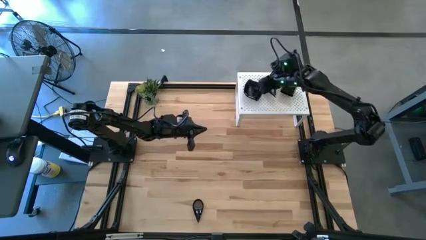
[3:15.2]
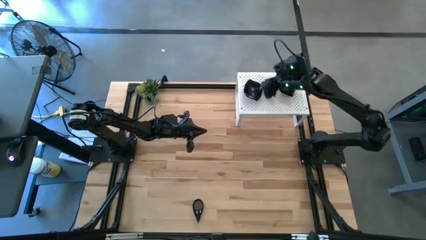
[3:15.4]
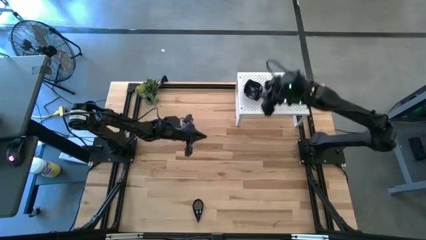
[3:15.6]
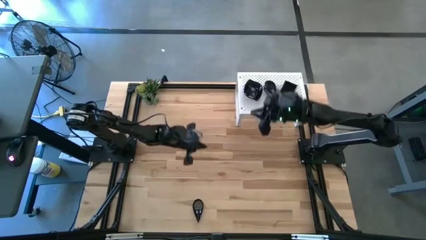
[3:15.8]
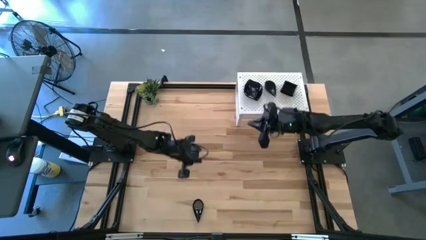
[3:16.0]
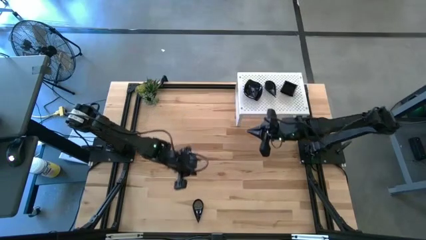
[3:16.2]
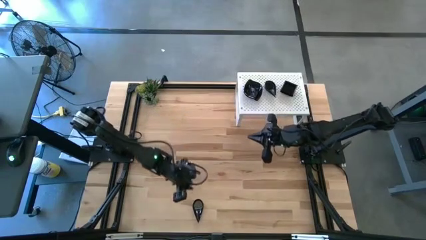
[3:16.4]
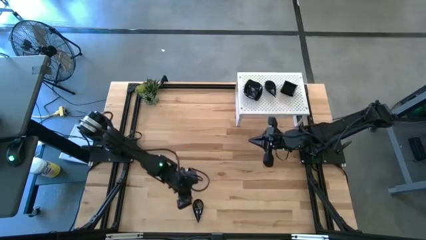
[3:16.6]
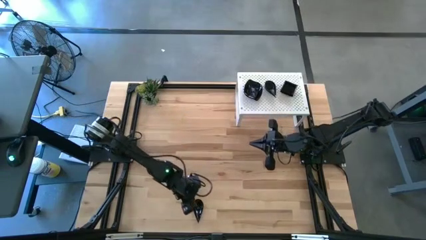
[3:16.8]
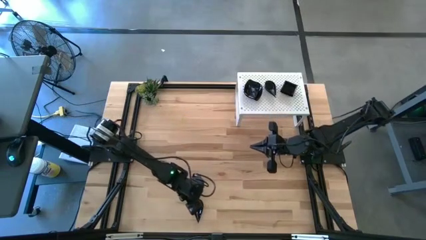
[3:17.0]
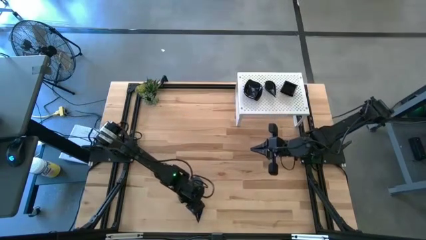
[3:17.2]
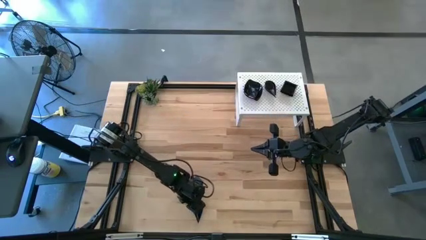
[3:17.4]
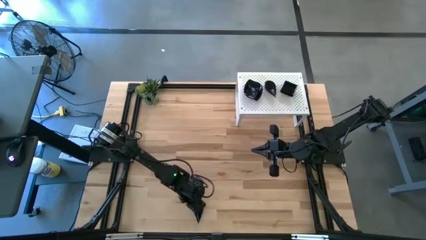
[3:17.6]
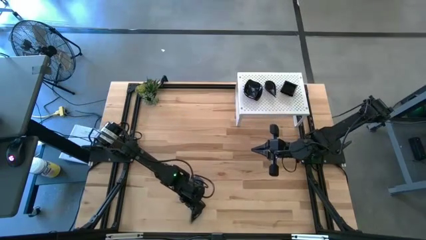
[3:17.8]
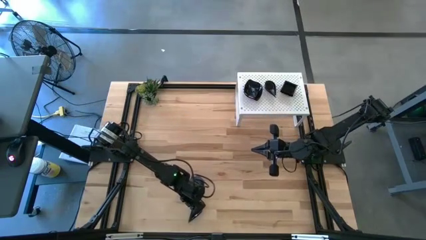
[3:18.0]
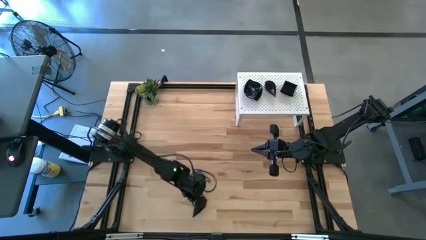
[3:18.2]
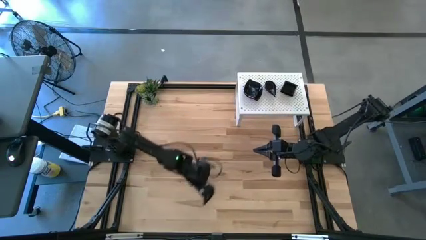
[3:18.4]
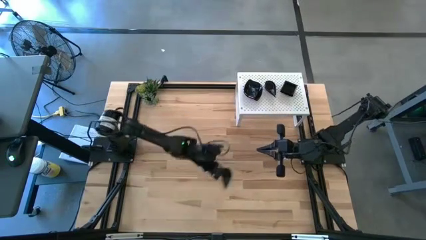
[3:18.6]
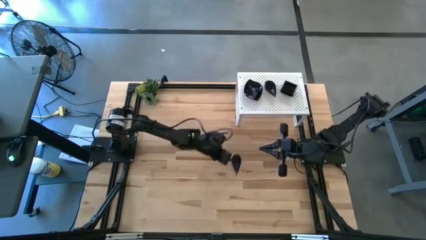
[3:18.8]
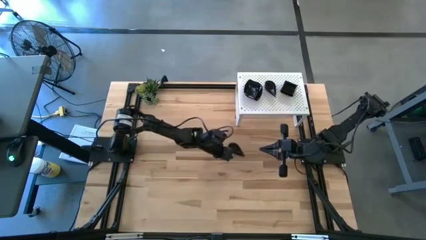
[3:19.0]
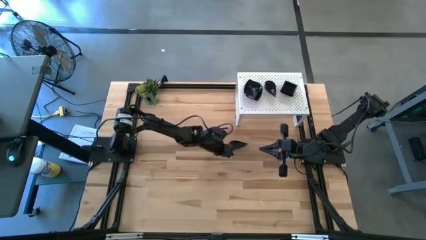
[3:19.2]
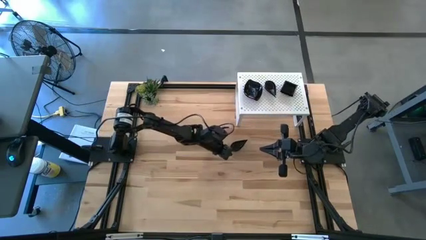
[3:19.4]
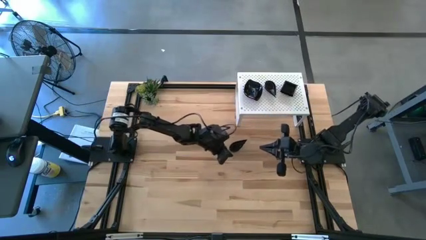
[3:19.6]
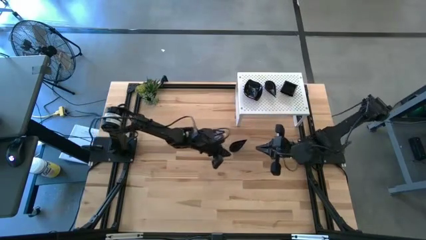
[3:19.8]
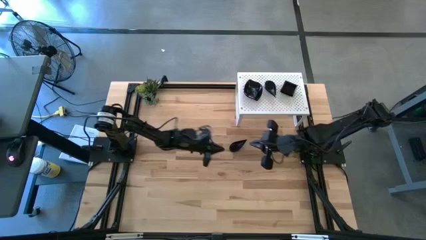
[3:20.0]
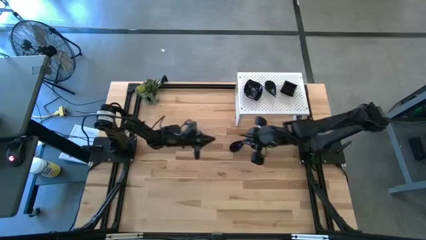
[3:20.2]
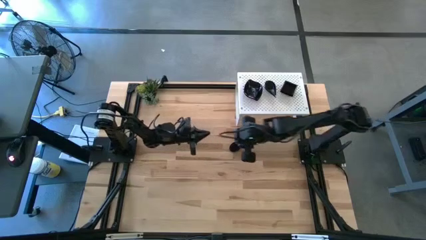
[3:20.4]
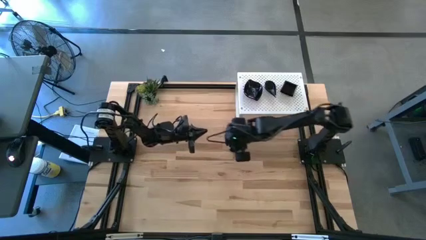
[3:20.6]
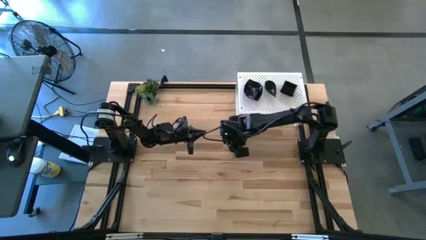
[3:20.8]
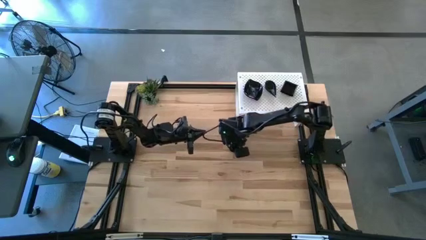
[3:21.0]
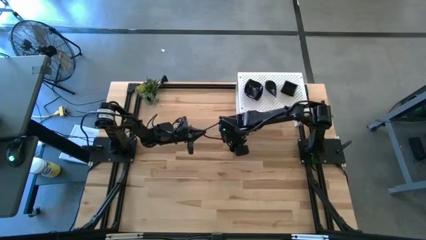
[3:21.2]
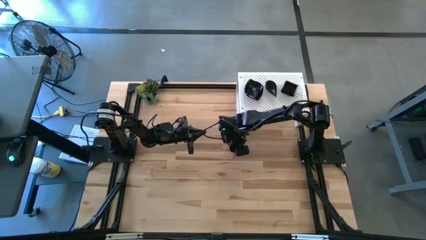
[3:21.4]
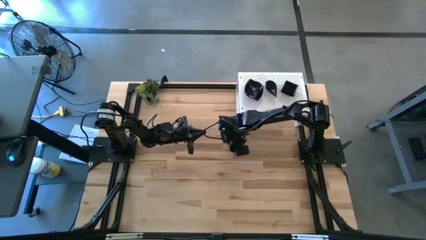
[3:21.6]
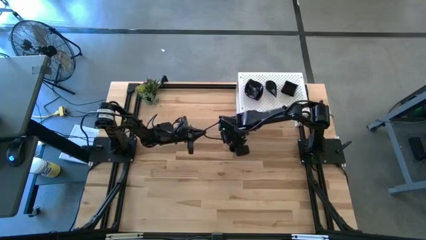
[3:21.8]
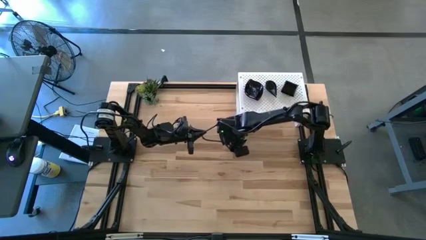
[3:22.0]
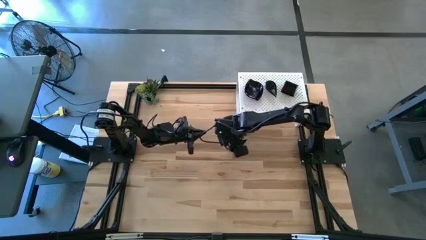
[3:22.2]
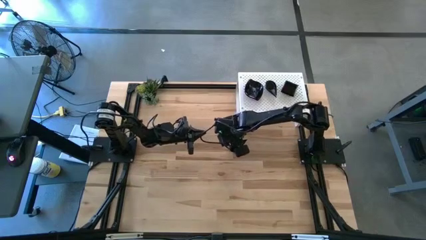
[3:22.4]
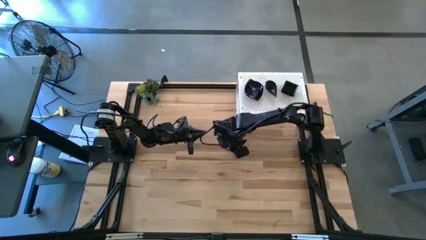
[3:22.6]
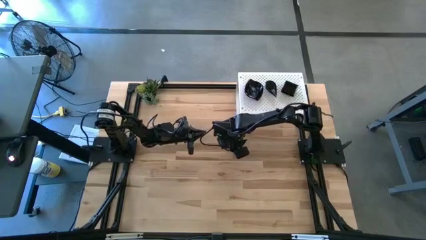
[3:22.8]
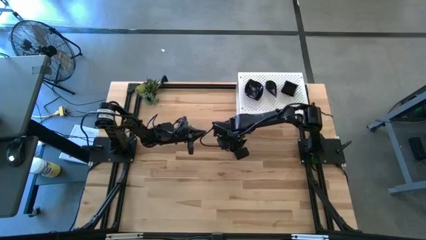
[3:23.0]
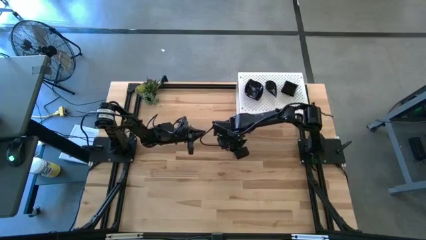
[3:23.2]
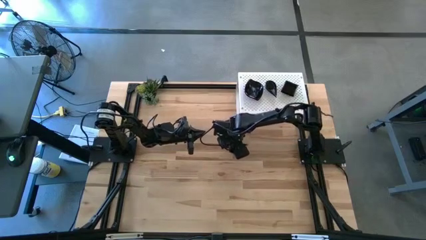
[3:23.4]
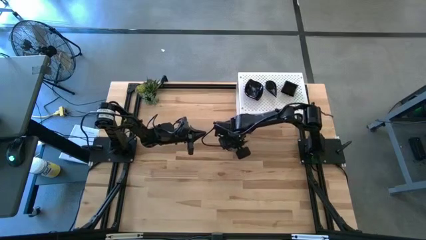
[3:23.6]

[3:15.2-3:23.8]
Task: Pick & Place Mini shaped plates
Stack the black drop-shaped plate on top of the black drop-shaped plates on the shelf

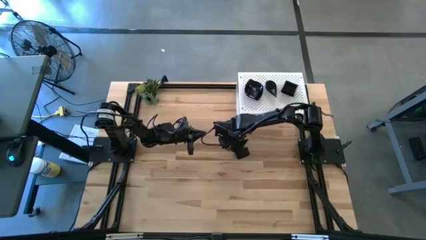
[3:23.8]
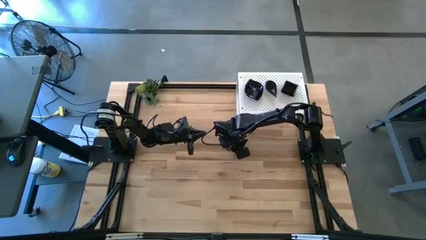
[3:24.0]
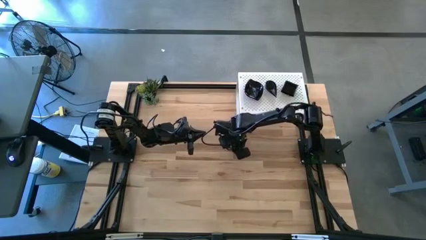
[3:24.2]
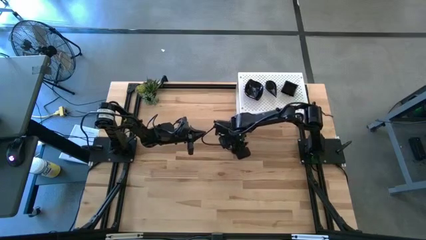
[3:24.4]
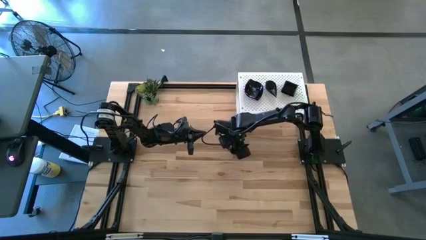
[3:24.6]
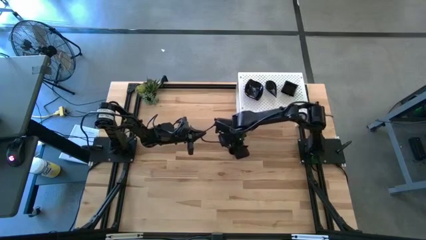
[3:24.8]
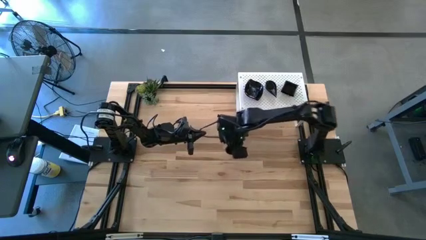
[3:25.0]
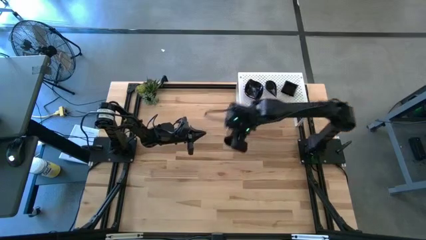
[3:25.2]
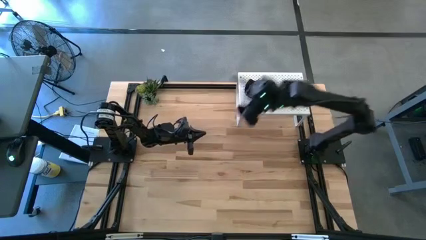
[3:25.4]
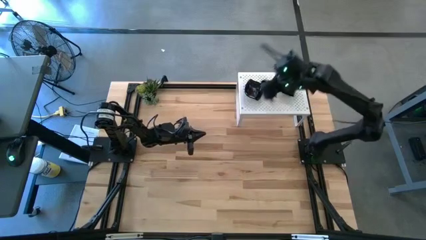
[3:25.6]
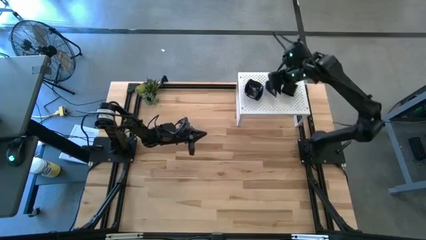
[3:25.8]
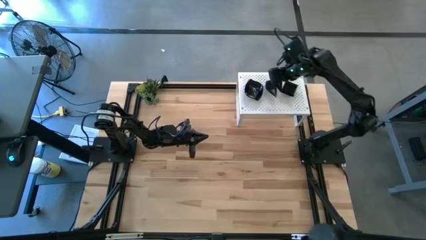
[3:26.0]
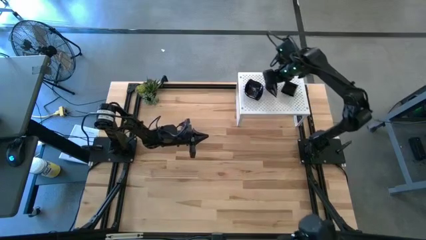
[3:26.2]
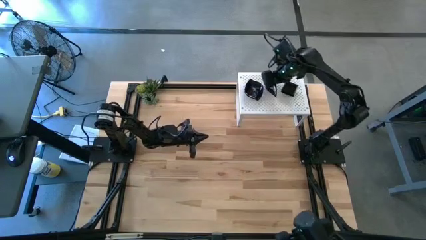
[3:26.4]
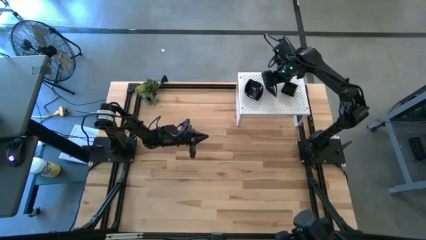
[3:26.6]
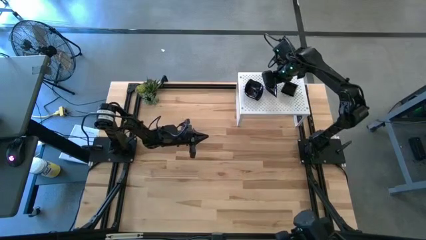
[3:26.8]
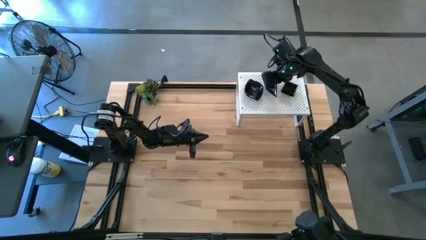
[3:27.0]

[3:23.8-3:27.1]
Stack the black drop-shaped plate on top of the black drop-shaped plates on the shelf

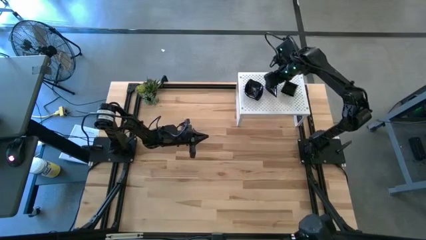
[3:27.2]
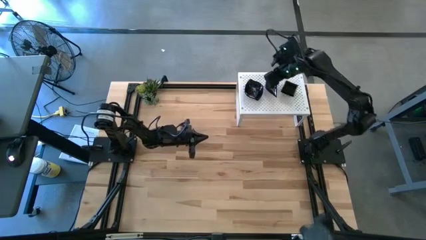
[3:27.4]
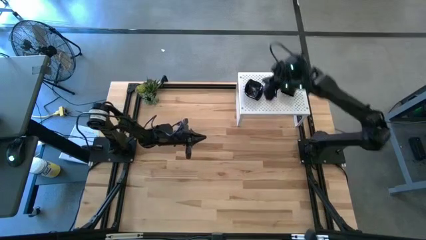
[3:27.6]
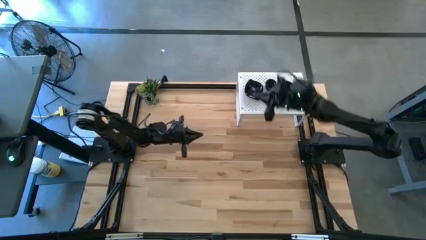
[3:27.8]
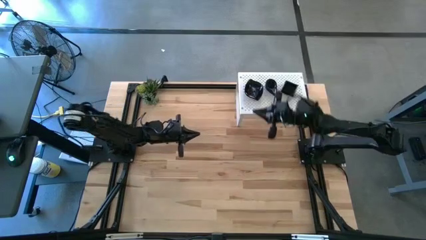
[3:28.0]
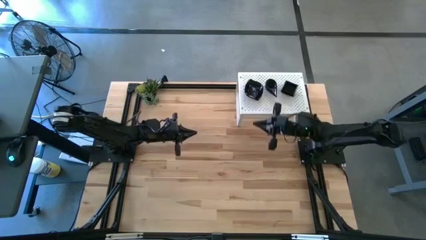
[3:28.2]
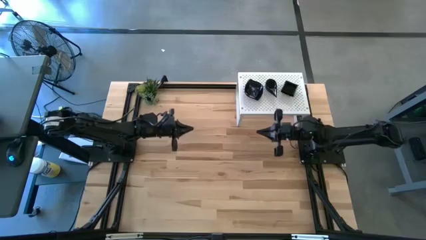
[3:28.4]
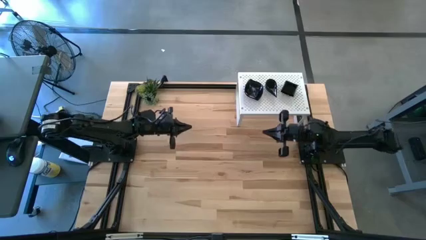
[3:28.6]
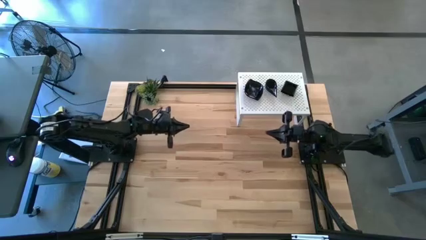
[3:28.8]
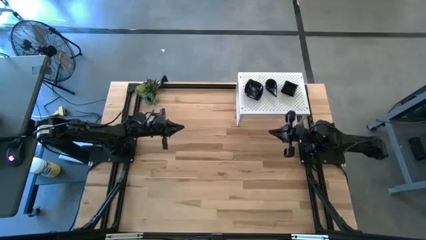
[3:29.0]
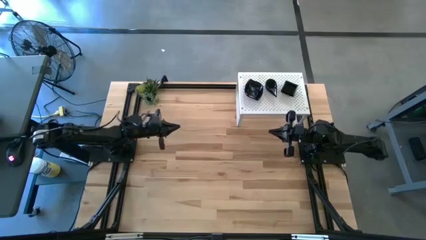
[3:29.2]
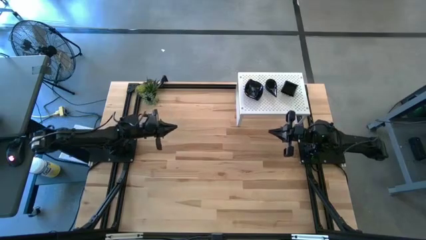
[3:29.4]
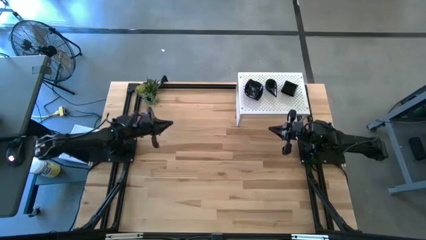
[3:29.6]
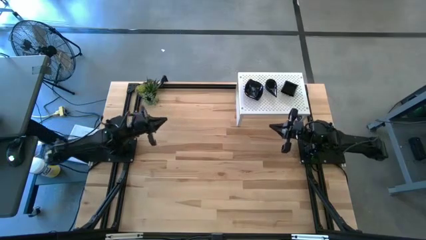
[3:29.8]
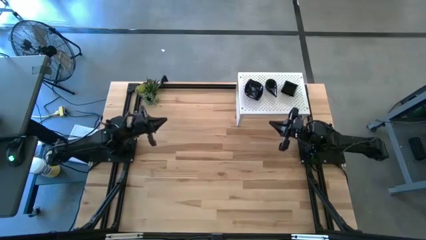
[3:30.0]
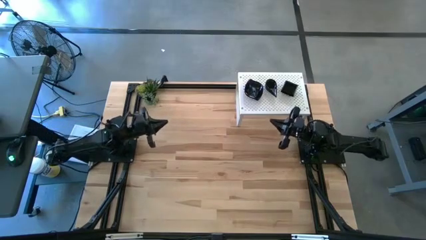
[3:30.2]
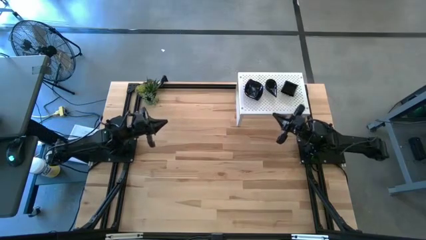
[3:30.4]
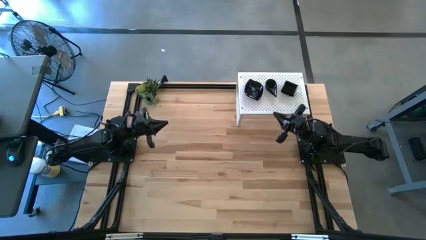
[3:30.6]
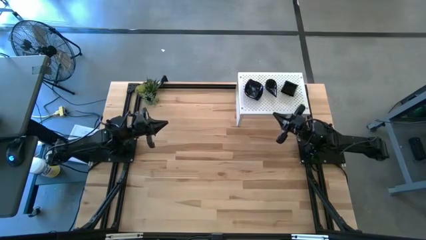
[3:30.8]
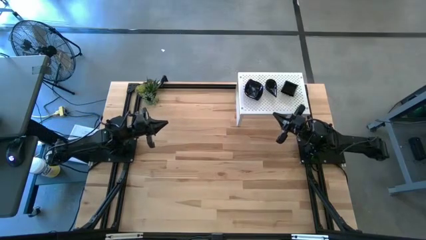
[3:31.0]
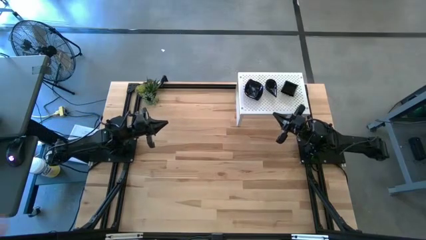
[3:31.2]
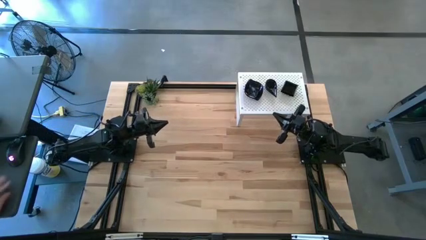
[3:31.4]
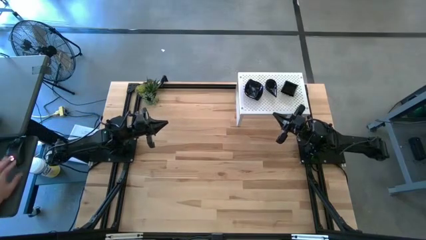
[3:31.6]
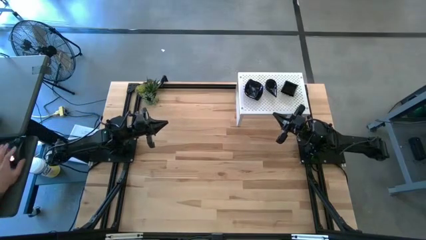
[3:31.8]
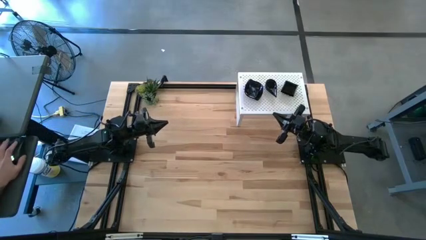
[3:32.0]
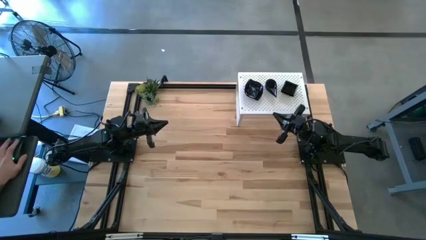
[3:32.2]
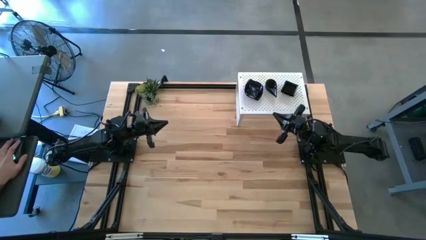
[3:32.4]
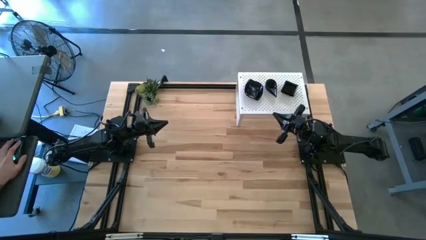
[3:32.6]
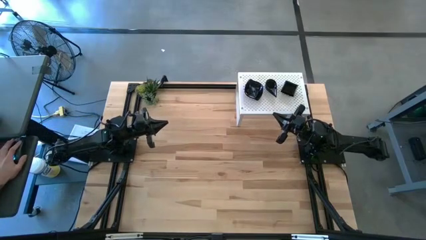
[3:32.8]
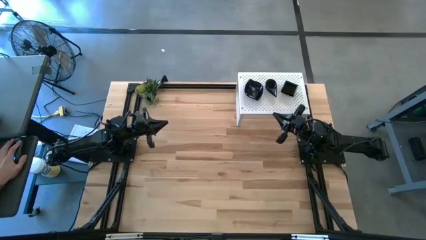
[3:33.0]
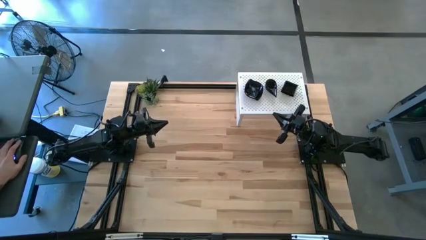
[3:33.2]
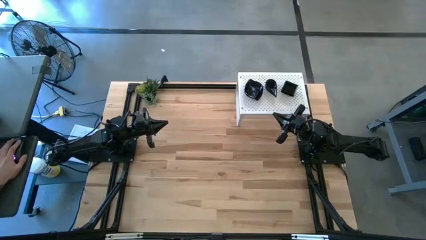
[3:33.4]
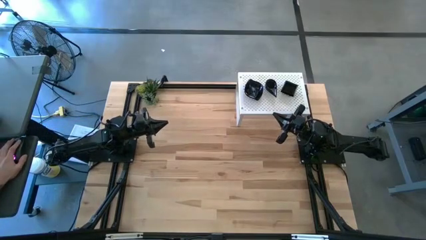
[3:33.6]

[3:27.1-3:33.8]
Return to Home Position
